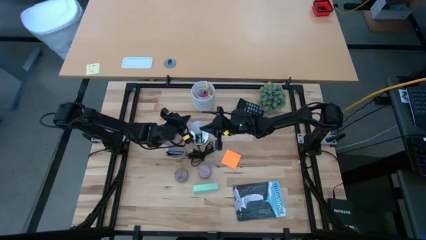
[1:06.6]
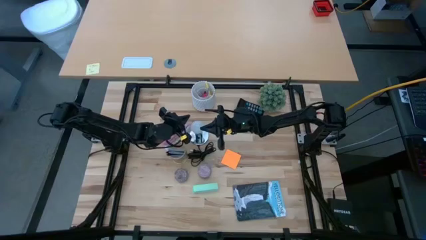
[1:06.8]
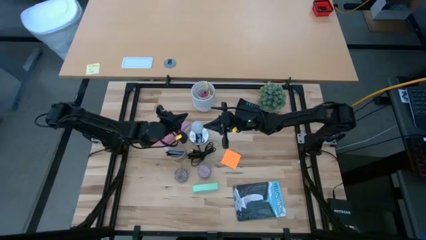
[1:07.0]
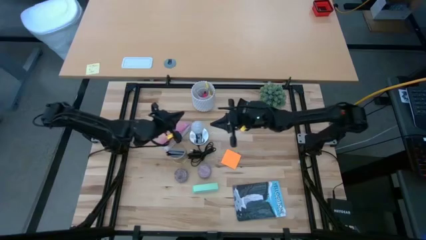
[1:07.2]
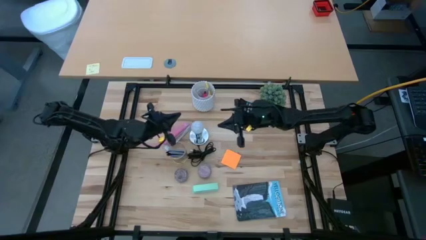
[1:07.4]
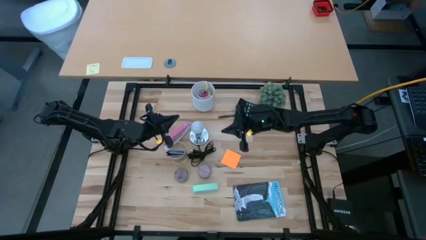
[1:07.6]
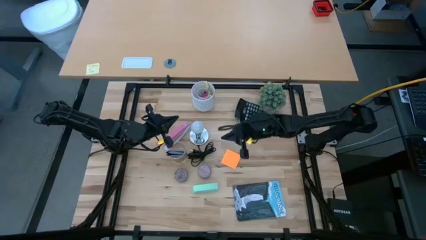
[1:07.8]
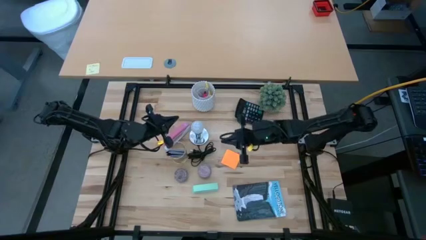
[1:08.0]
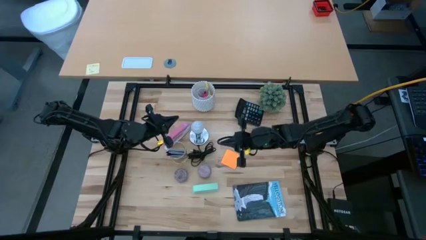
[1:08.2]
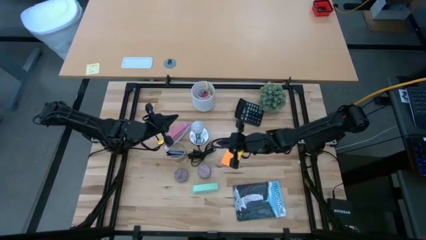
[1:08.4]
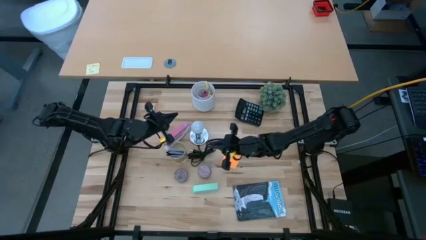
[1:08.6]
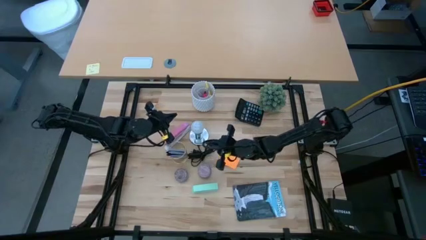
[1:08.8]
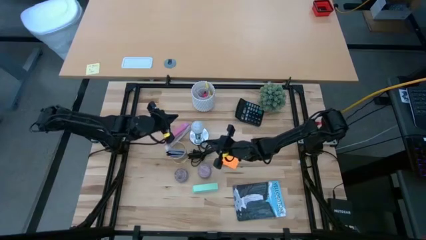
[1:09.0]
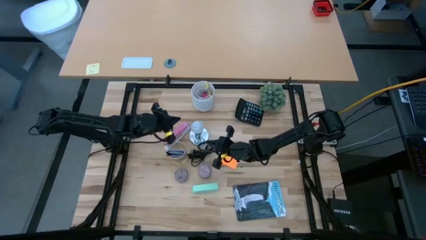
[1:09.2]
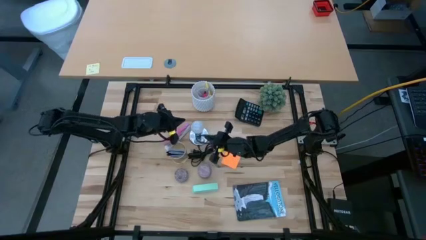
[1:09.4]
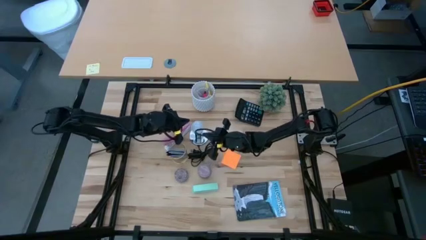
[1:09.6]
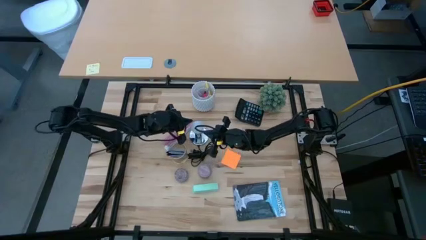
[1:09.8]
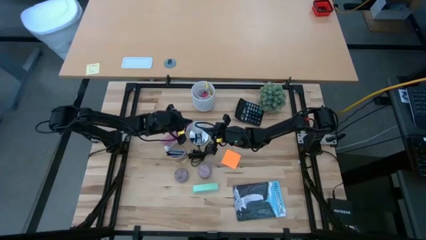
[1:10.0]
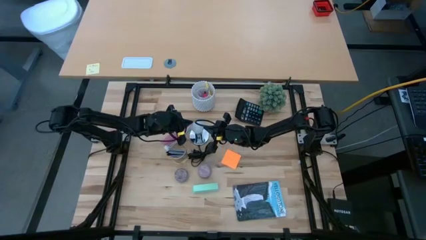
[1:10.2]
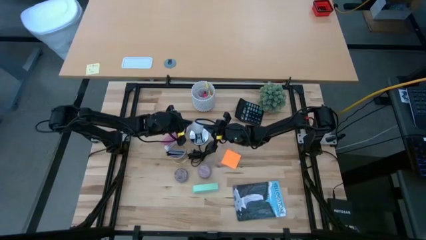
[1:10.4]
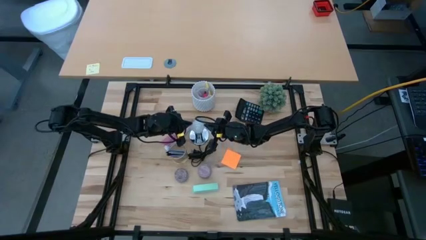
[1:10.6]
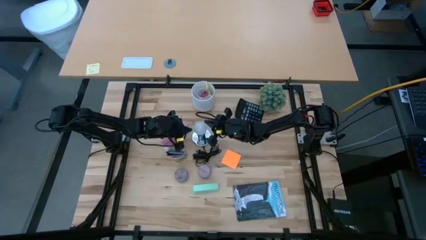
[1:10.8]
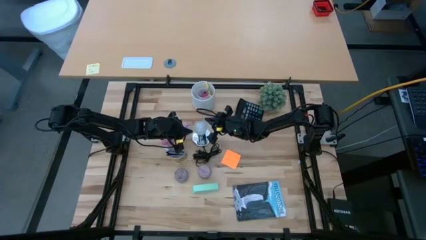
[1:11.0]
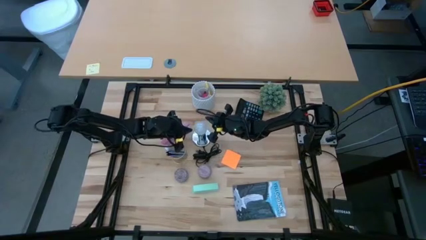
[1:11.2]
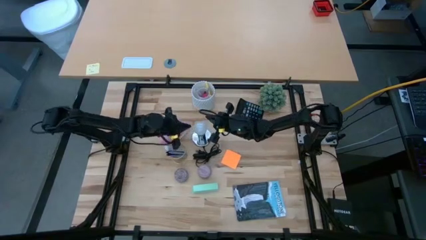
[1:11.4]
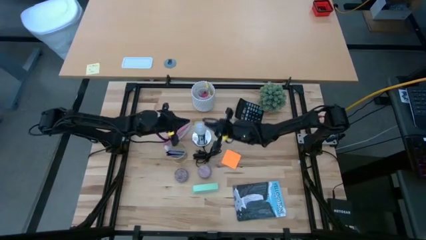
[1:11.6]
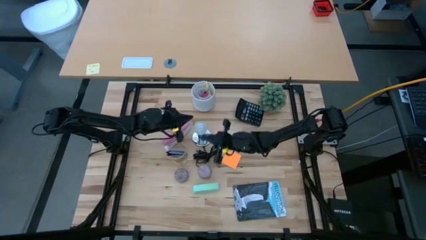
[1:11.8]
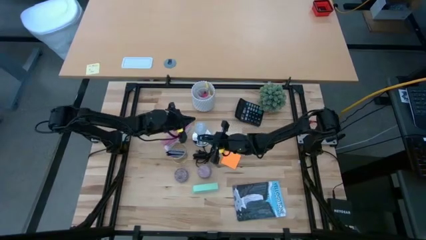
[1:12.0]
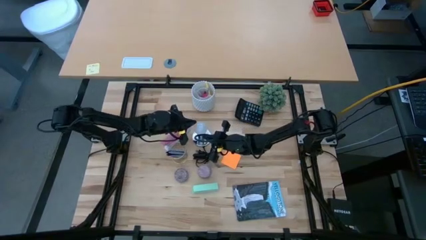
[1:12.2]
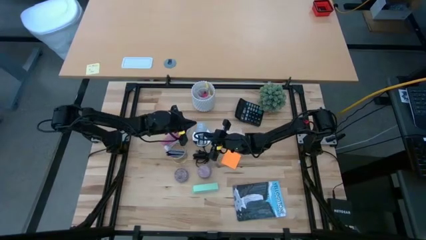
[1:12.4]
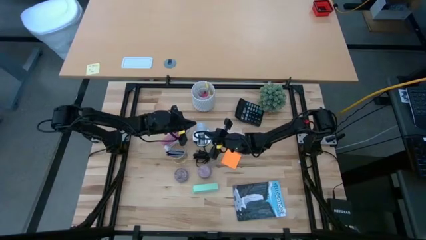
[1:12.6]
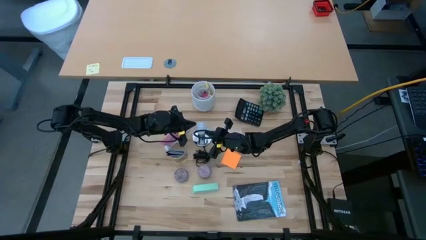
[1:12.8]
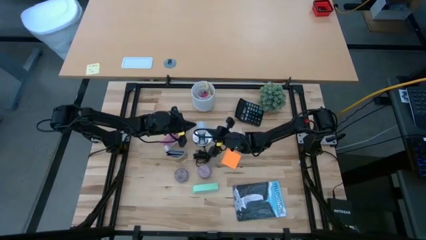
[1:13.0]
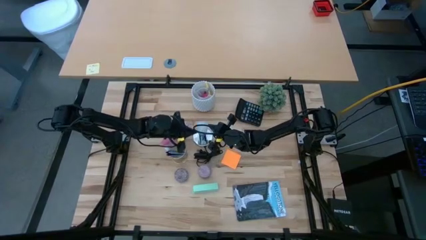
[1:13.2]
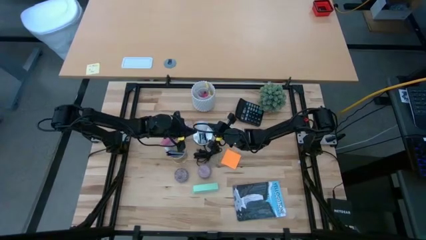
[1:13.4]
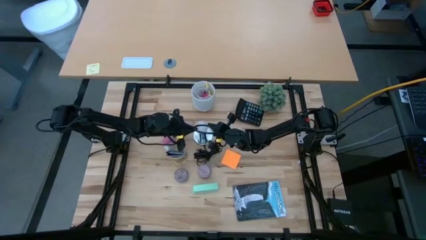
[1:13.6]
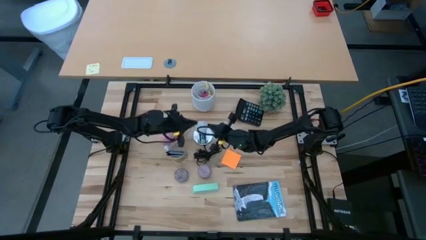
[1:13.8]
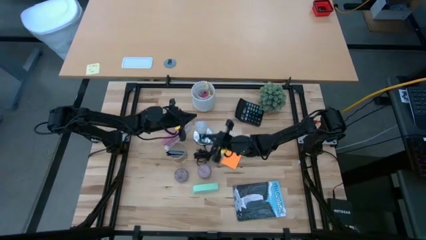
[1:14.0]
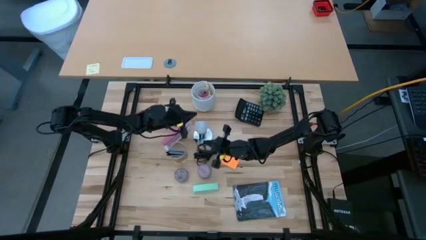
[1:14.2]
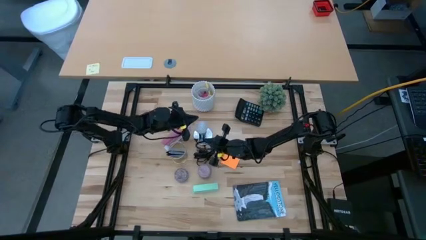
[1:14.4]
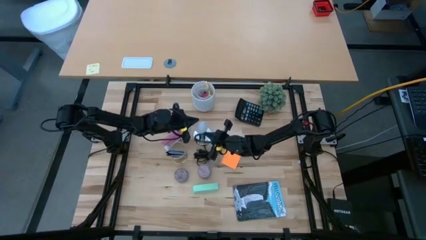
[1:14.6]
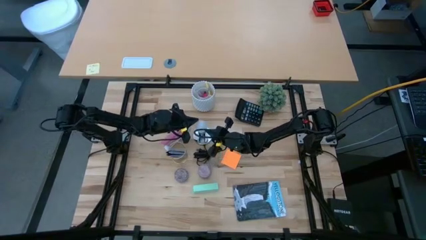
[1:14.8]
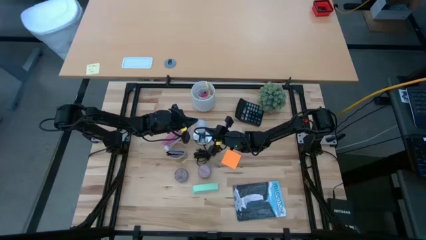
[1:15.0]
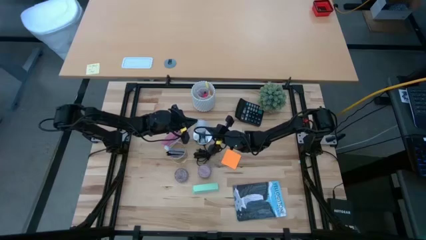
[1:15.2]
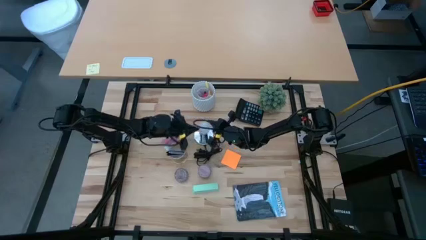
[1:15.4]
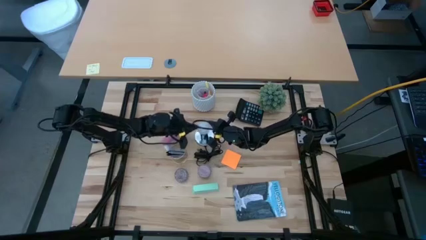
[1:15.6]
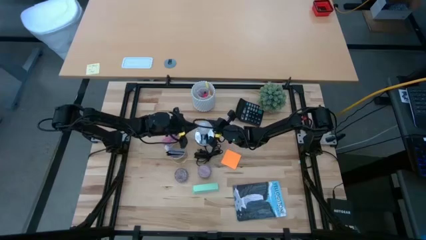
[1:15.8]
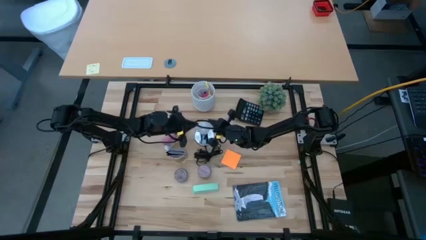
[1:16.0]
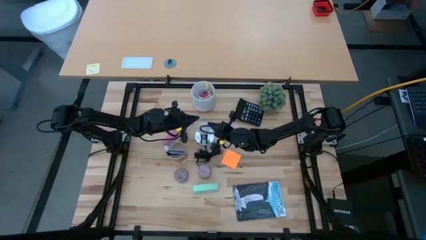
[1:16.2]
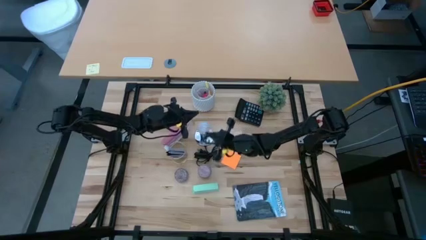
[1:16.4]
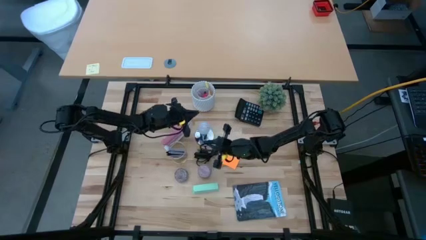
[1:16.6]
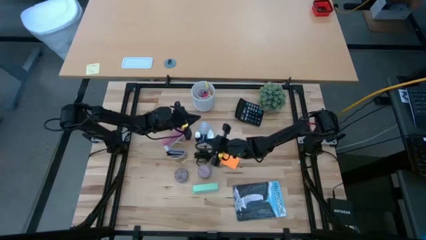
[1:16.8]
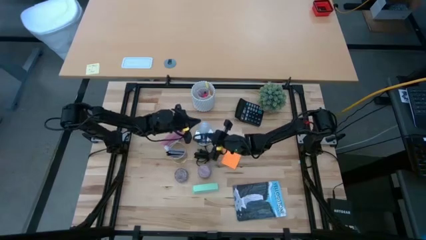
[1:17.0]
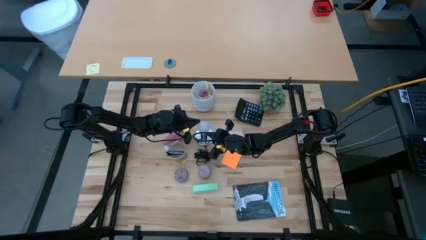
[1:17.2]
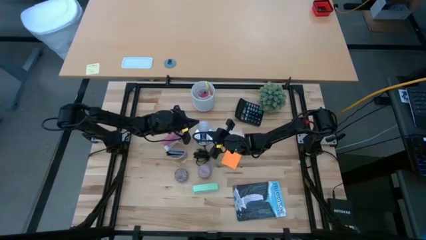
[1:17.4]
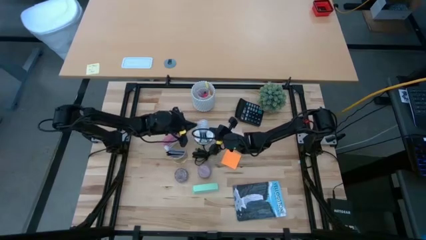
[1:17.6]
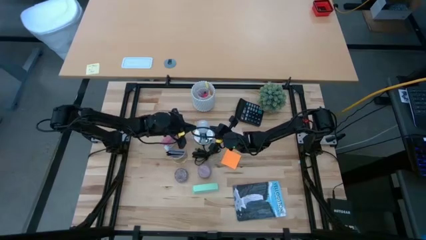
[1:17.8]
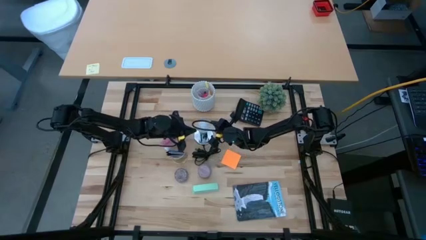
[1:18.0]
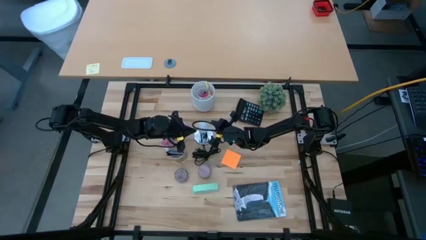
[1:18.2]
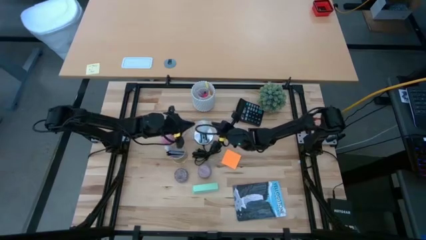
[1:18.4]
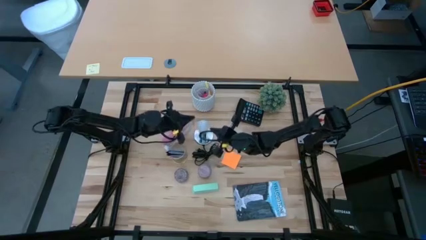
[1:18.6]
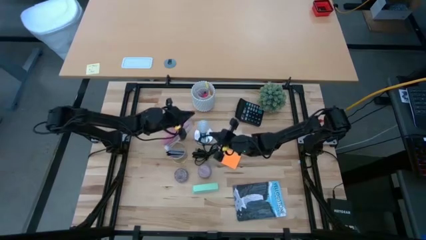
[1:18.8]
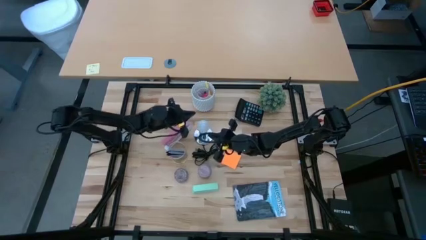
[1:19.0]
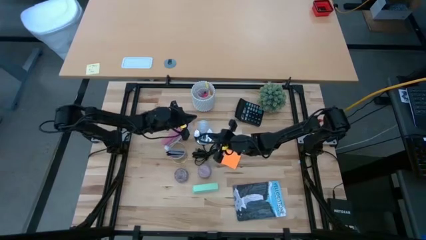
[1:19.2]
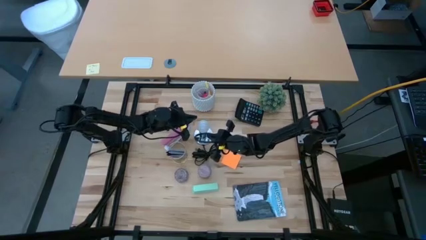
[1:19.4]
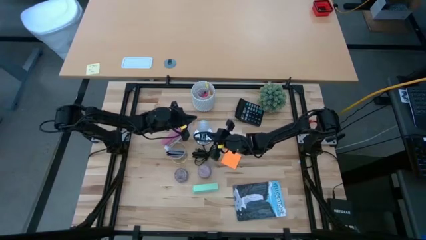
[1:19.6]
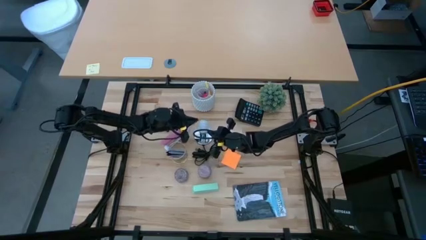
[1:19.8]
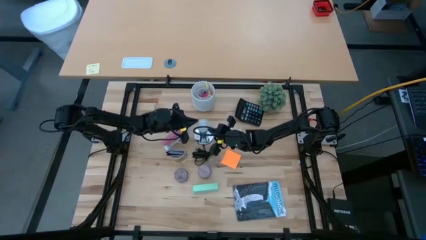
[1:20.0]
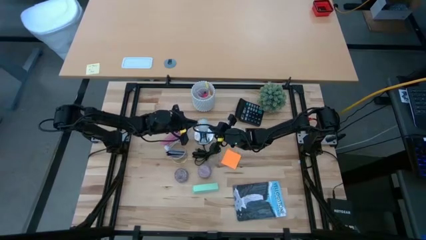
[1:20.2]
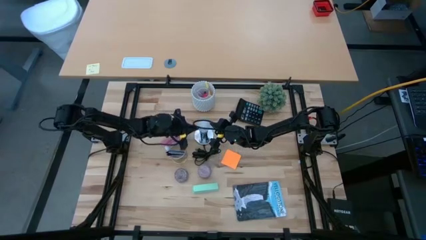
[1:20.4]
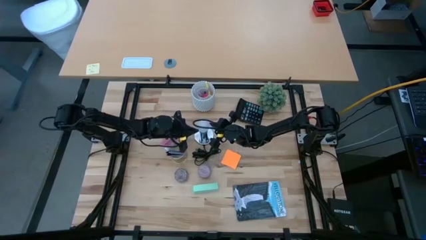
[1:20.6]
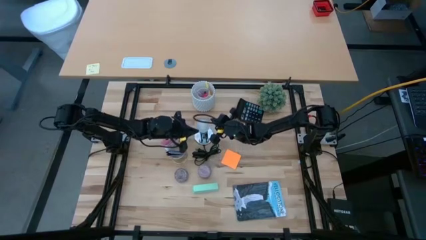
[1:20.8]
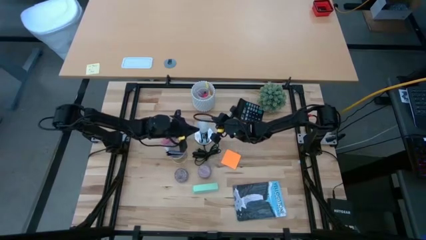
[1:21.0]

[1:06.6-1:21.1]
Task: Screw lightbulb
Remove the white lightbulb from the silver lamp
